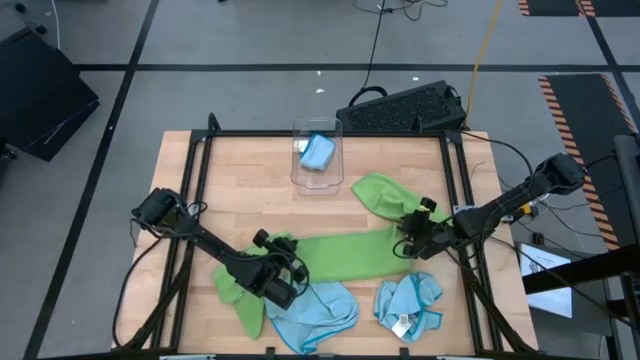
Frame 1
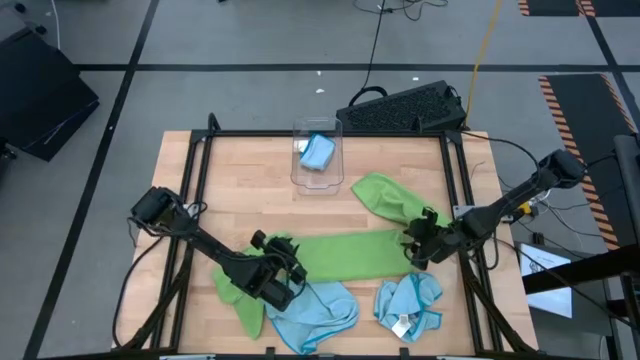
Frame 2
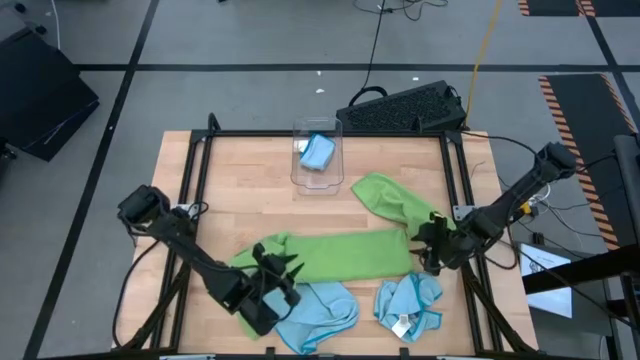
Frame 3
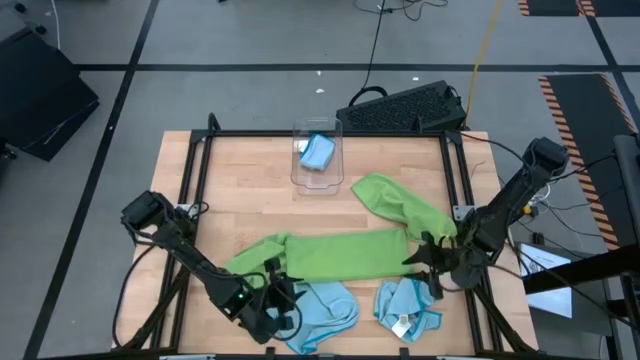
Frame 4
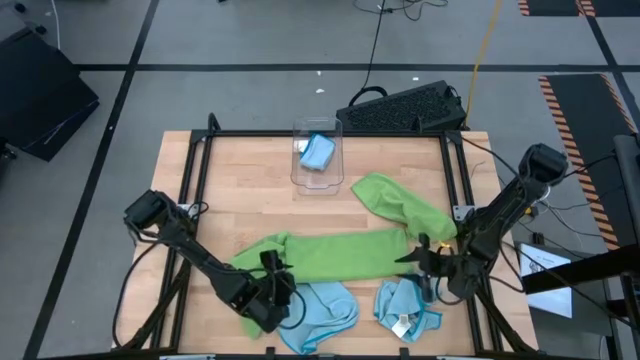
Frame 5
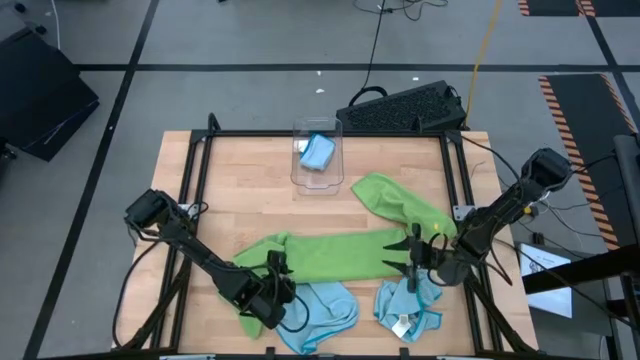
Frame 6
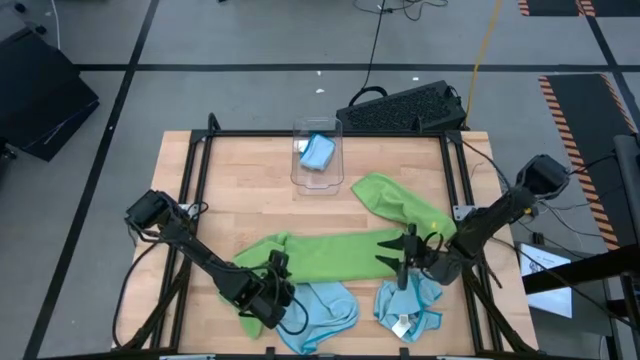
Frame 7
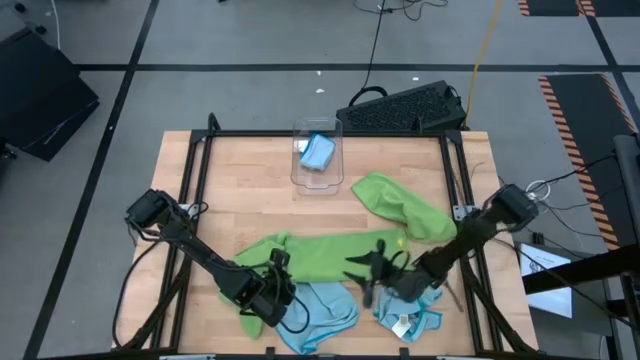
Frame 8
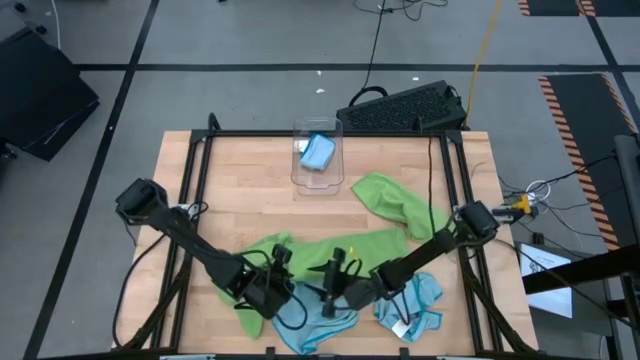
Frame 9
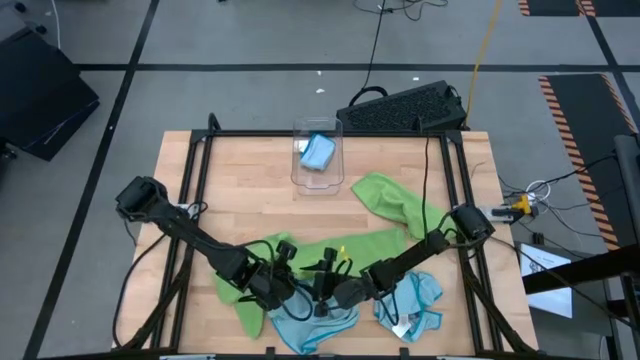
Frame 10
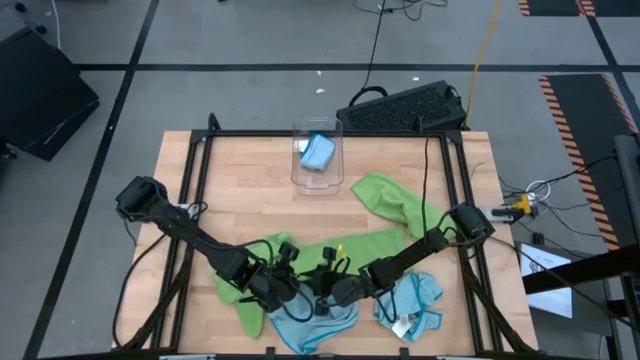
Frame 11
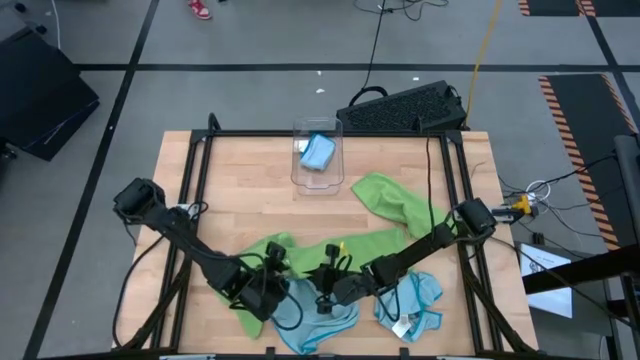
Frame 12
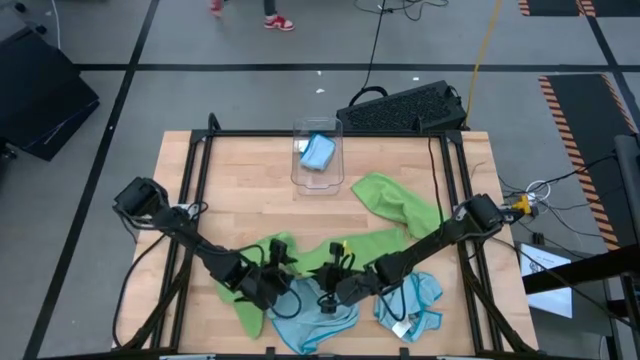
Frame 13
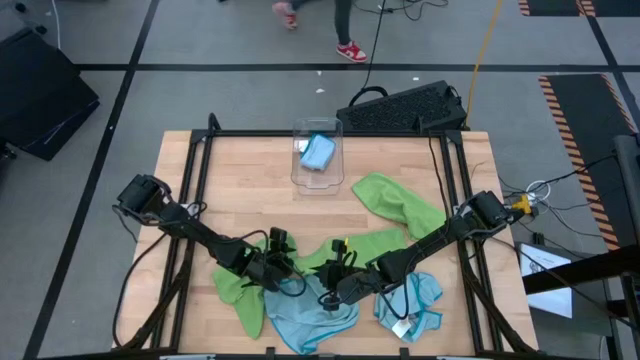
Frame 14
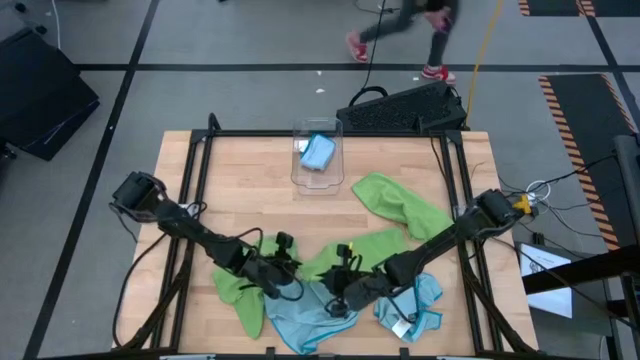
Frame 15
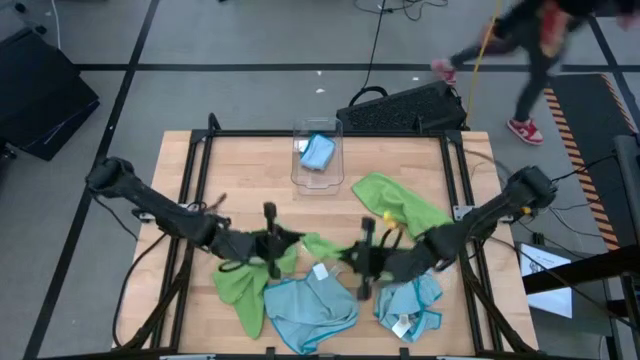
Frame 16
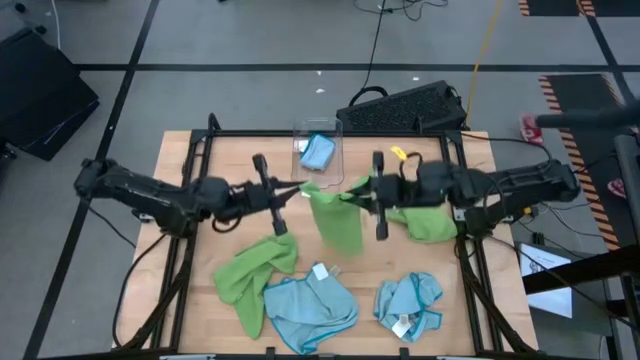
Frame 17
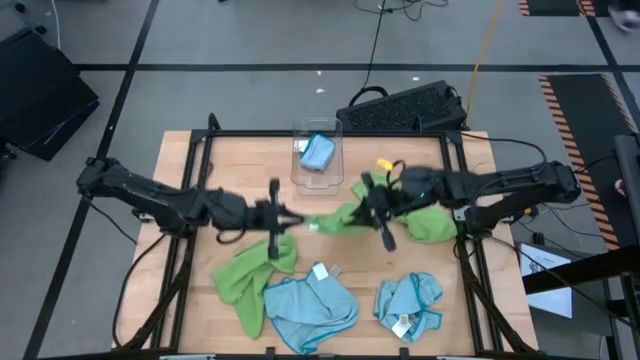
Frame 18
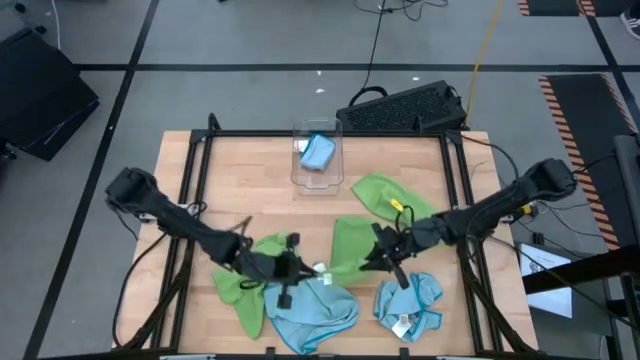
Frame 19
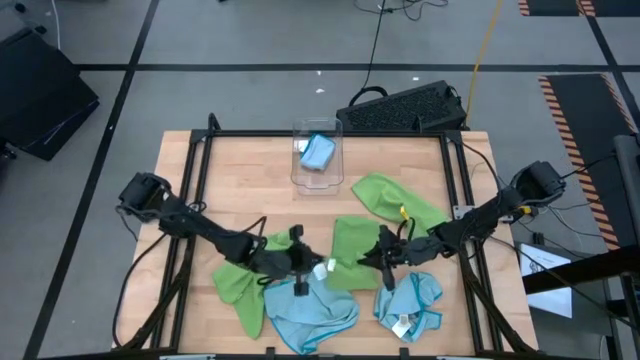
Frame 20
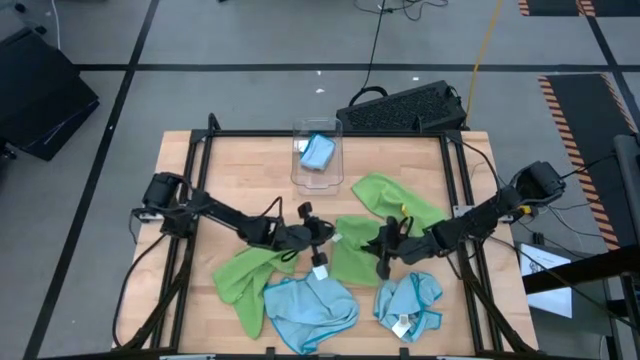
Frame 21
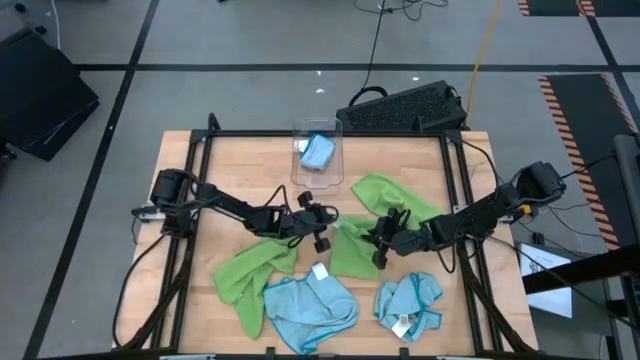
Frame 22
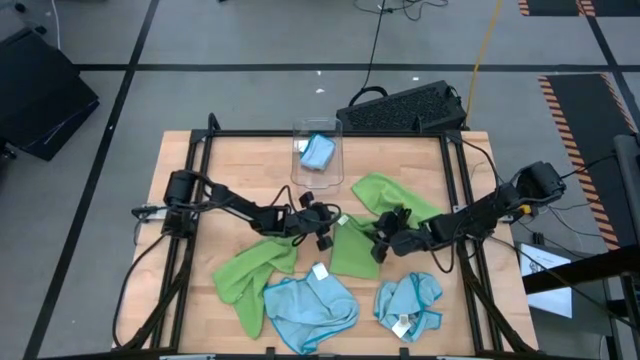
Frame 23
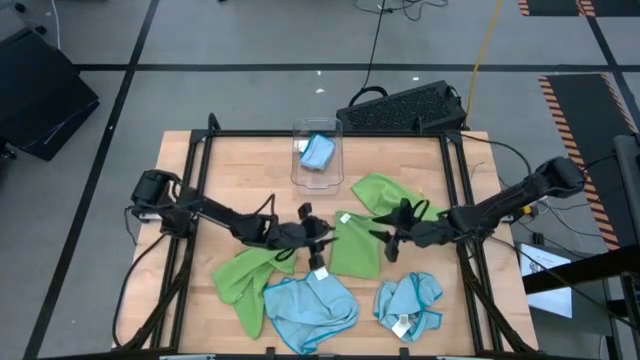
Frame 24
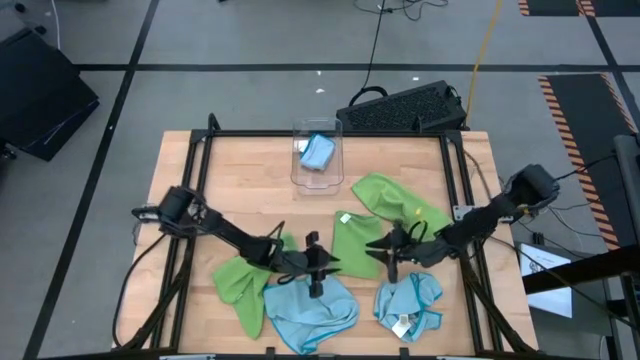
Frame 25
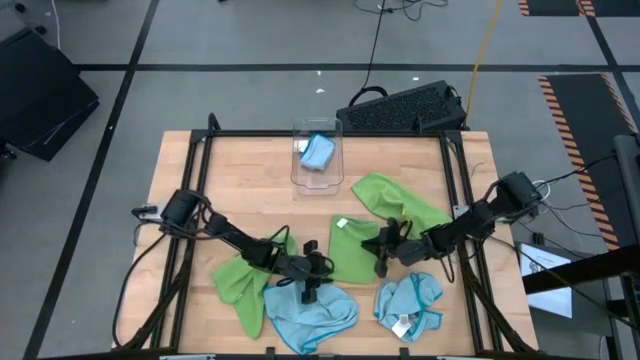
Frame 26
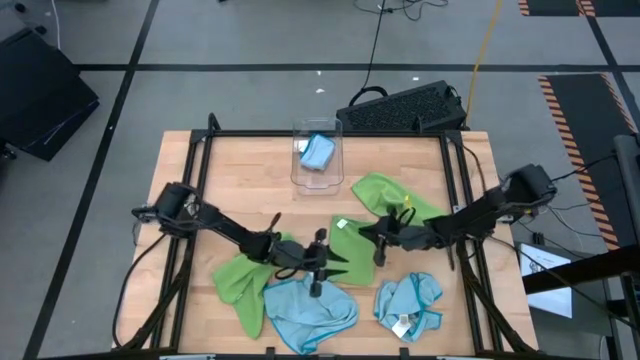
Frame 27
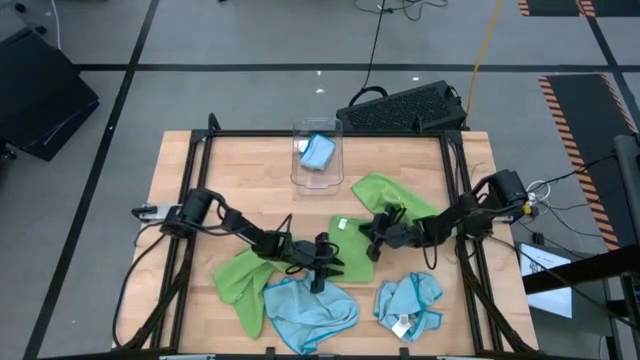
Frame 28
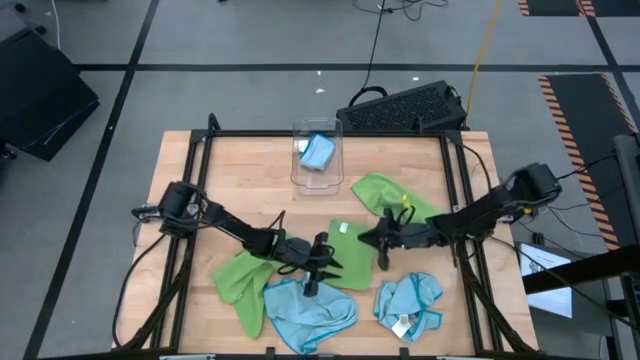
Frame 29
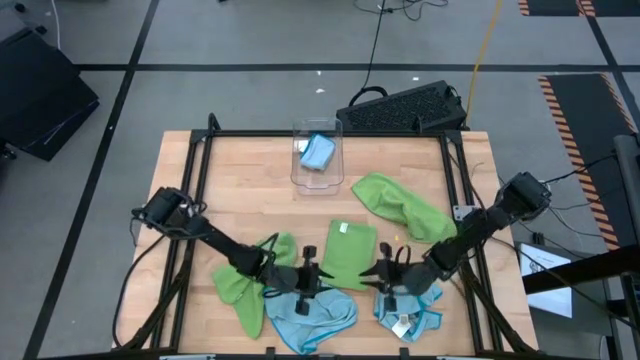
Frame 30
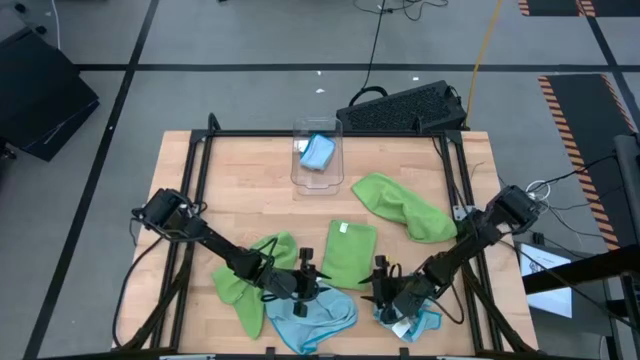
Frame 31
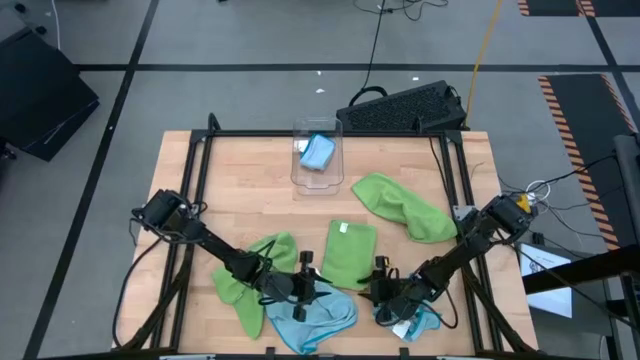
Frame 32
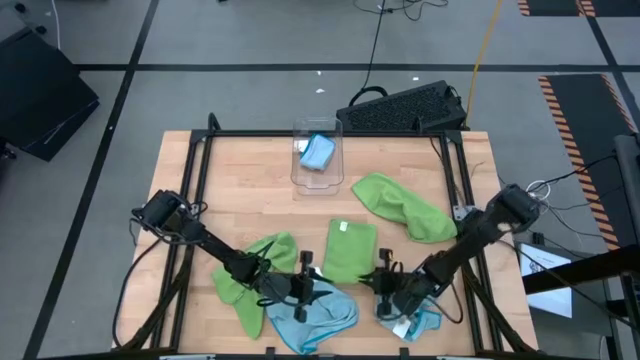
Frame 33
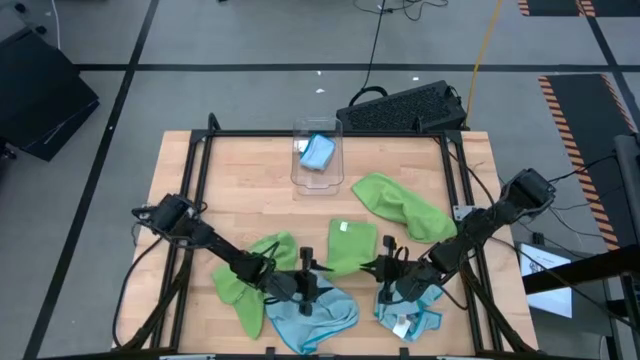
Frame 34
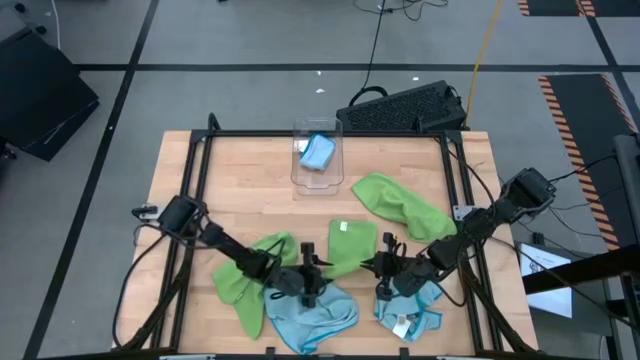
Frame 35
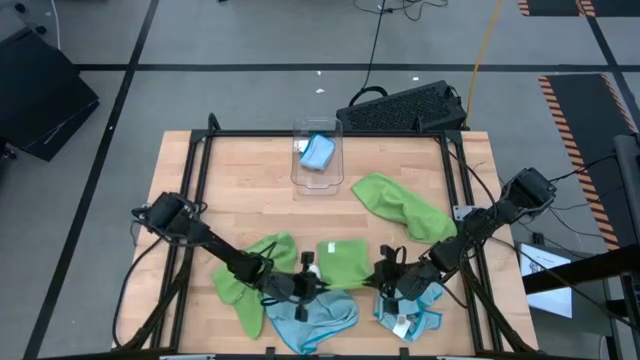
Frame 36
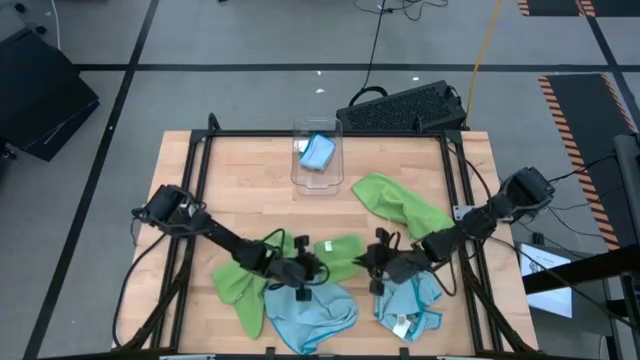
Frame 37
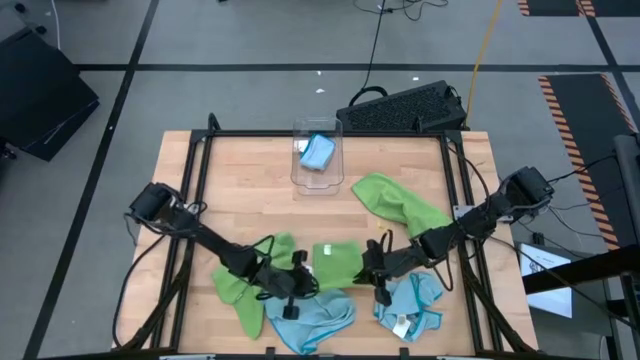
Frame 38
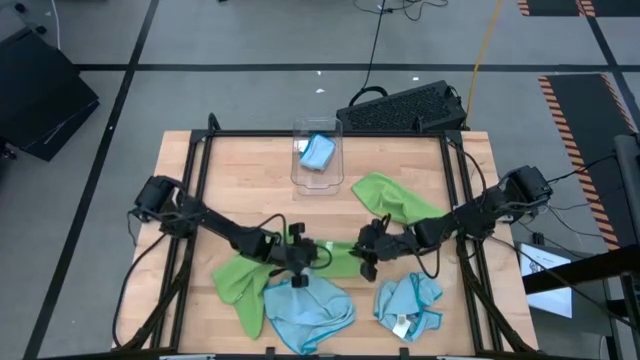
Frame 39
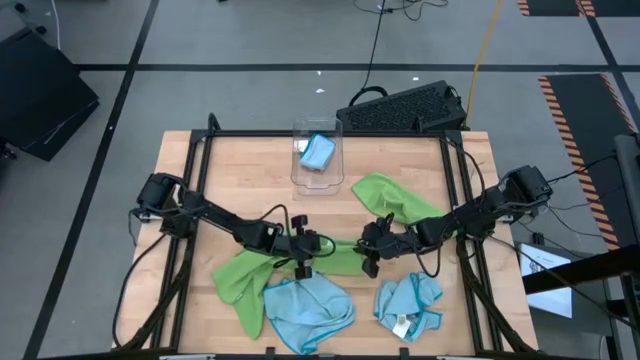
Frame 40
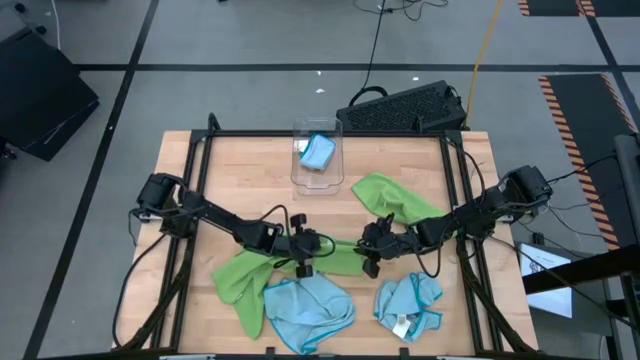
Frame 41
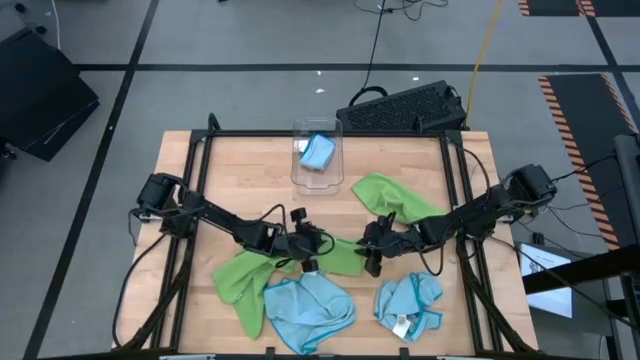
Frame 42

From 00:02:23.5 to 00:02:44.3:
Task: Fold microfiber towels
Fold the center green towel
